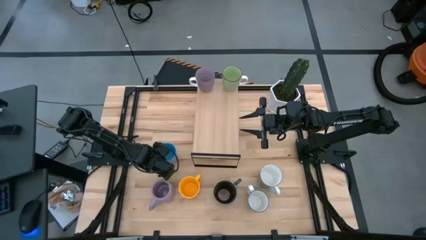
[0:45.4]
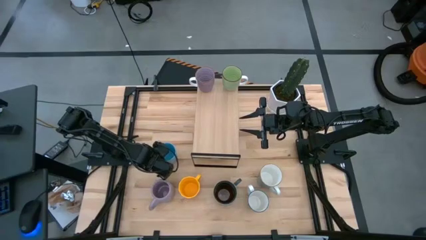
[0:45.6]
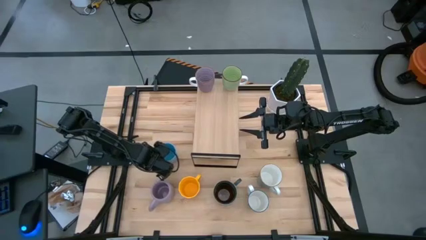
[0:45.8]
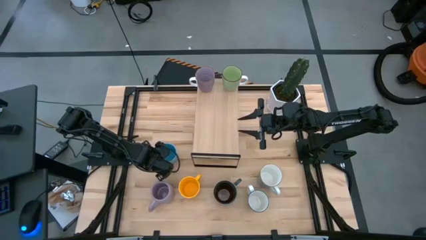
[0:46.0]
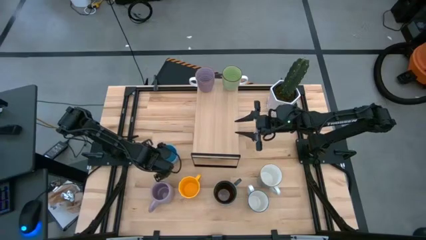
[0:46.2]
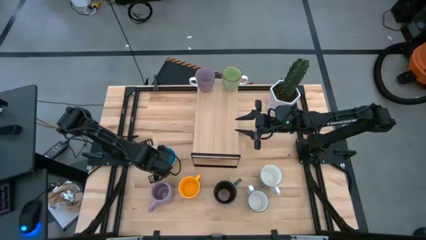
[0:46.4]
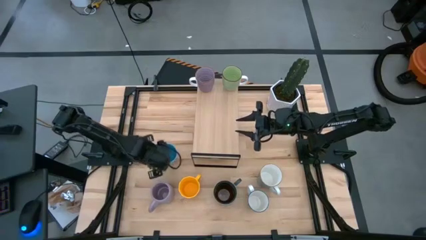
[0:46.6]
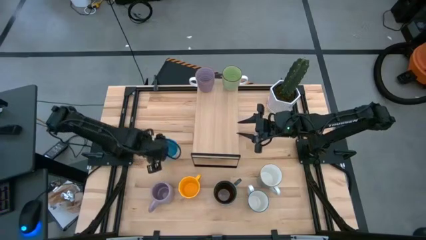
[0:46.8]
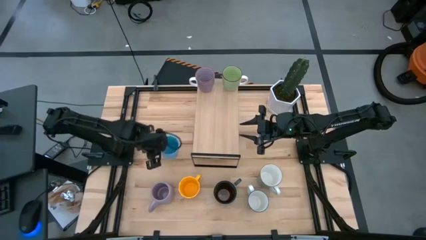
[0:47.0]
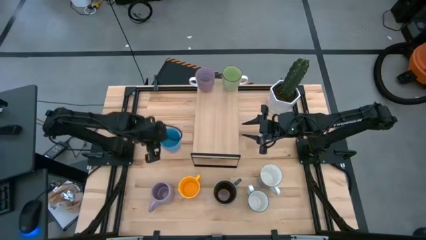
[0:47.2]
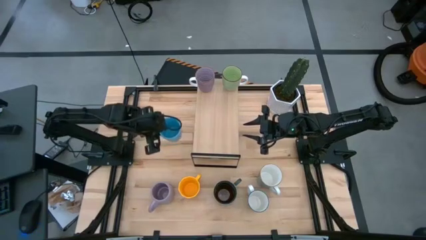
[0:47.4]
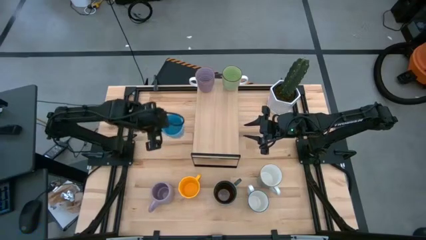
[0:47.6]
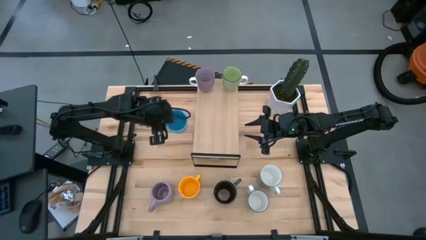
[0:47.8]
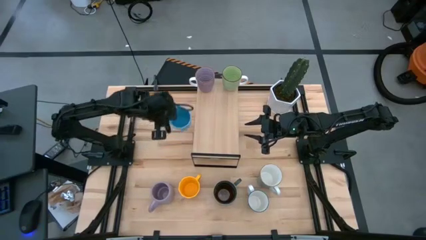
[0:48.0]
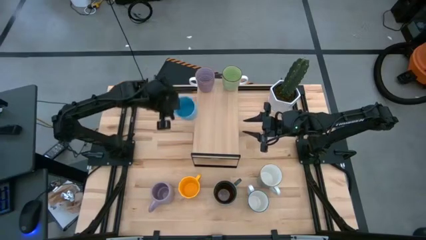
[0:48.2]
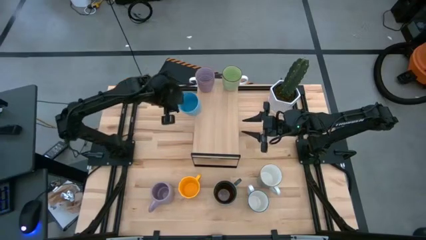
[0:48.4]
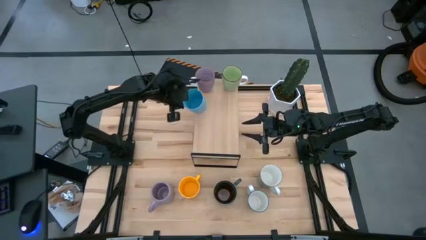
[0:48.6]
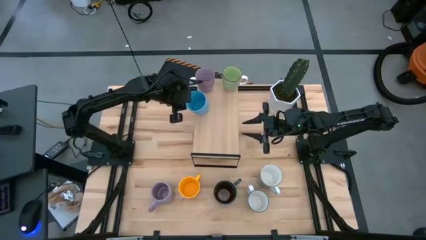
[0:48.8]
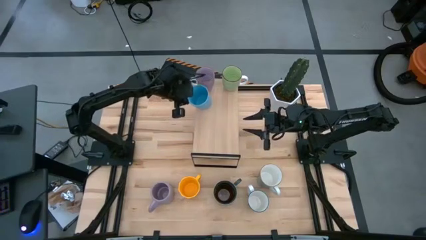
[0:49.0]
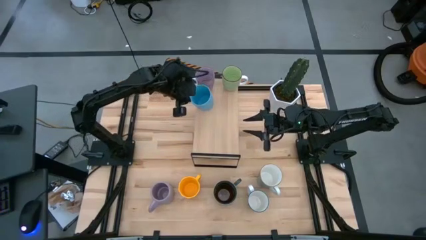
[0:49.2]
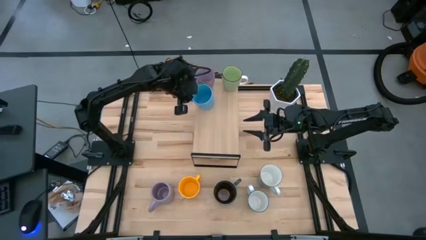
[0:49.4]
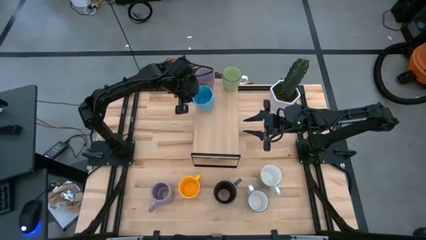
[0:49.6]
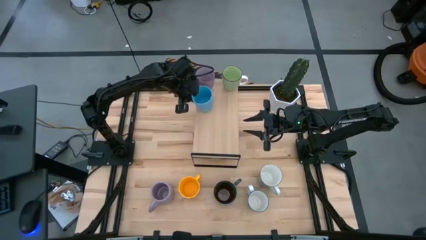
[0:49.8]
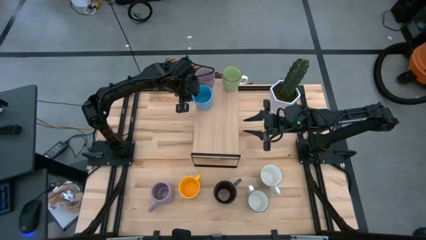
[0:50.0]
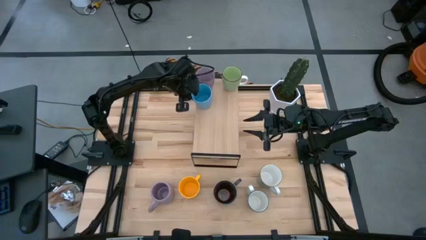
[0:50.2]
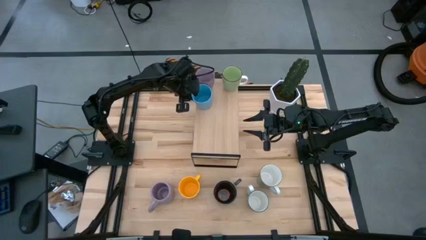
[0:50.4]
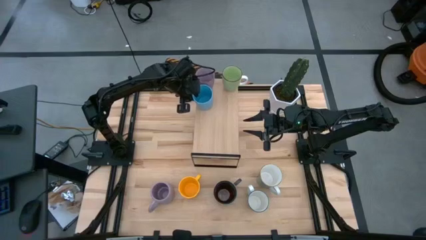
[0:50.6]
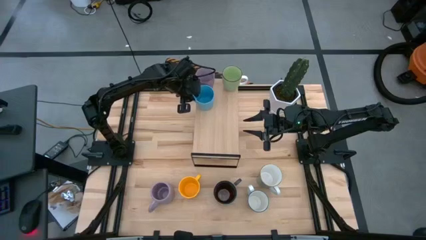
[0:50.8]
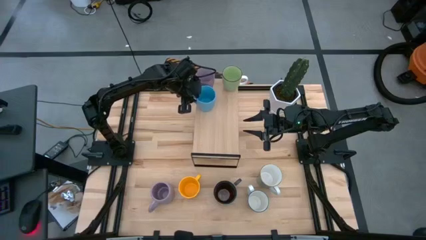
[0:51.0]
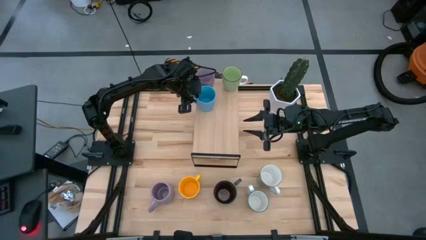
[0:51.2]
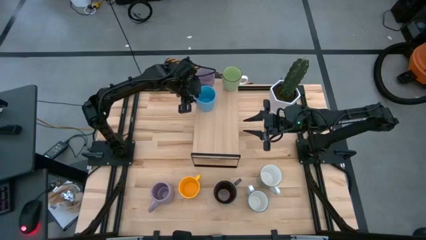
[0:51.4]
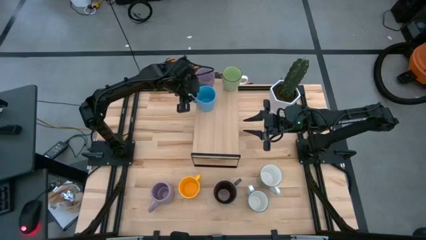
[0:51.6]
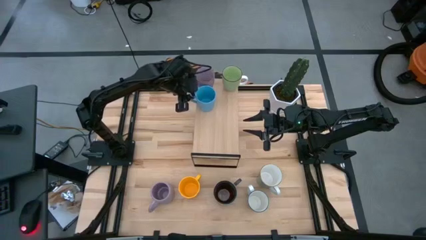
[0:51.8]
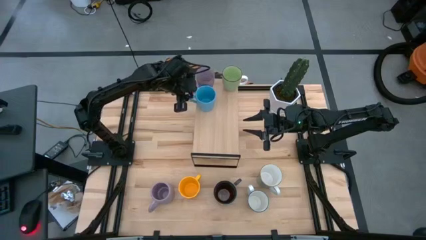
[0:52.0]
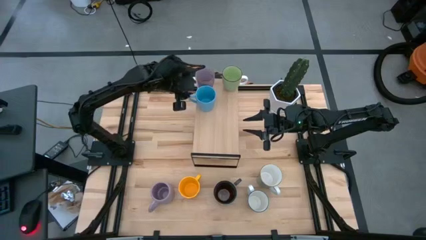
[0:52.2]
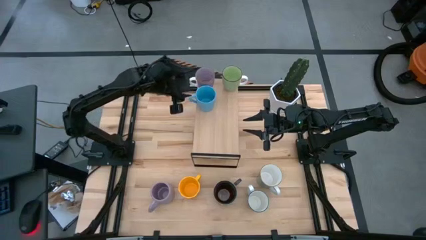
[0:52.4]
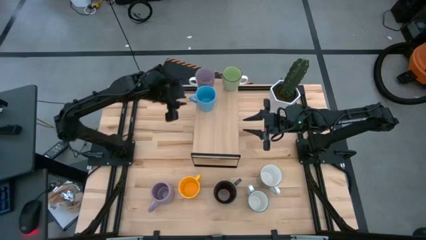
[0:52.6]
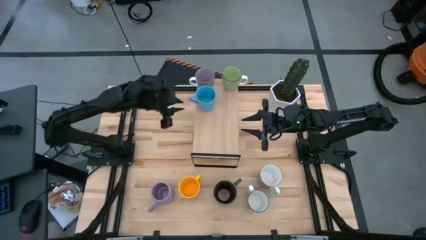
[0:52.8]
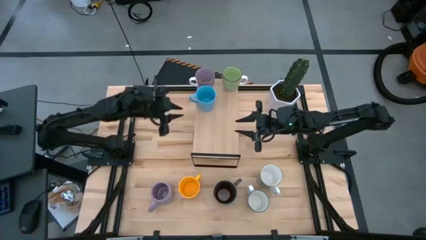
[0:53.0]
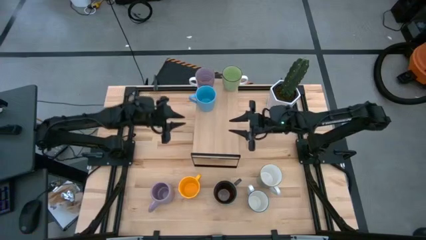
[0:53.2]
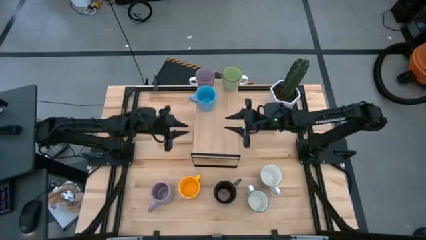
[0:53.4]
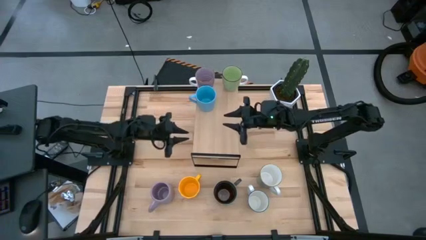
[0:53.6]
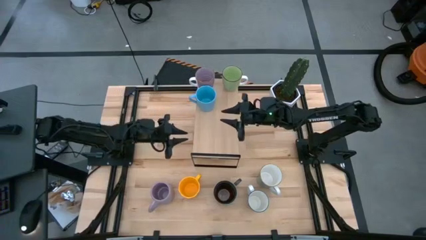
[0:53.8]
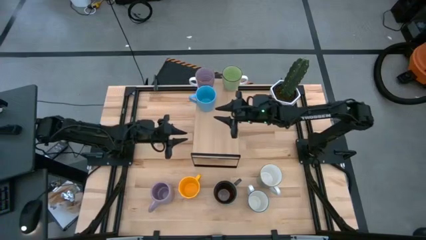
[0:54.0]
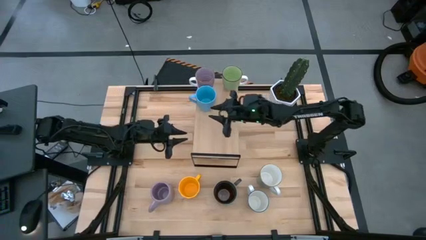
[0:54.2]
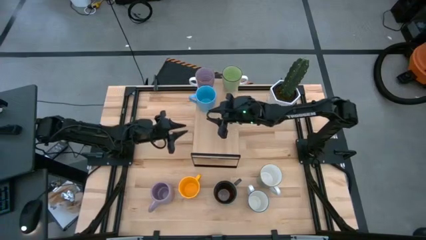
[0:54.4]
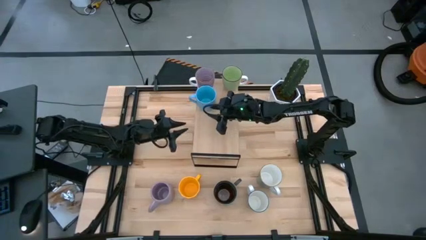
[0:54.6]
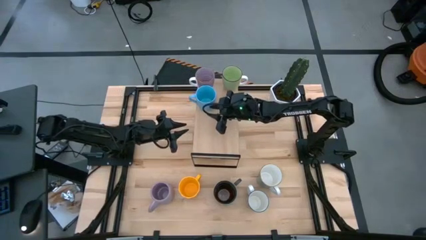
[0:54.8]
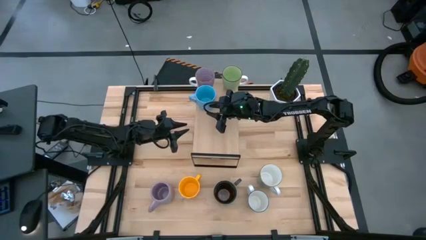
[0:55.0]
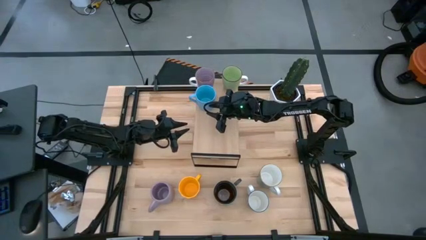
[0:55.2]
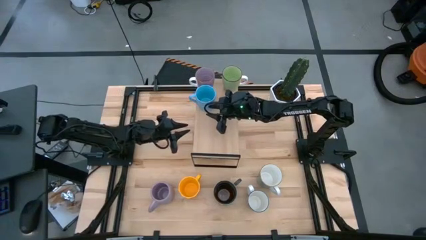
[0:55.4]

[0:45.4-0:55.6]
Task: Place coffee mugs
Put the light blue mug on the shelf

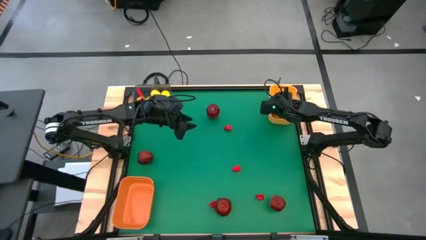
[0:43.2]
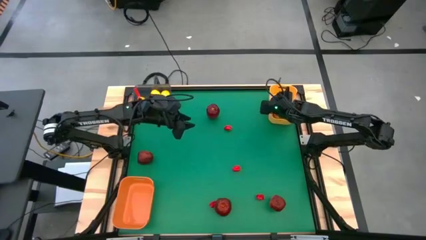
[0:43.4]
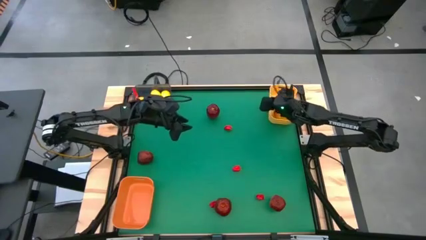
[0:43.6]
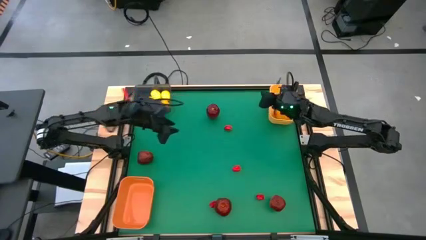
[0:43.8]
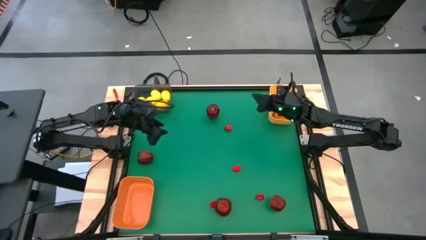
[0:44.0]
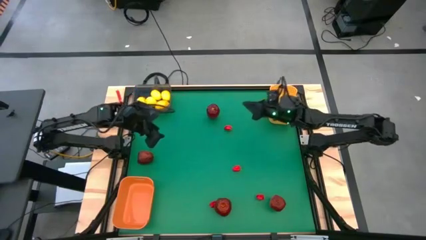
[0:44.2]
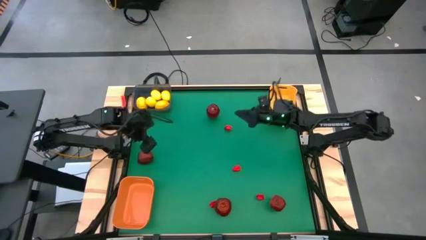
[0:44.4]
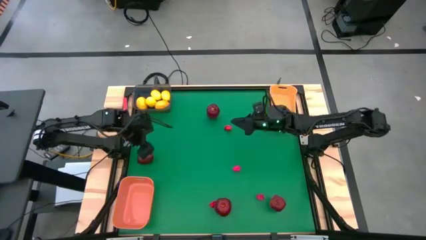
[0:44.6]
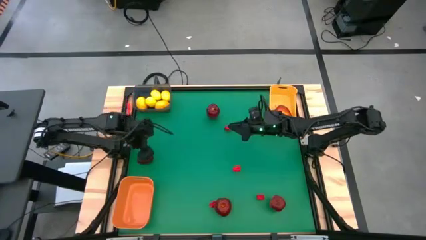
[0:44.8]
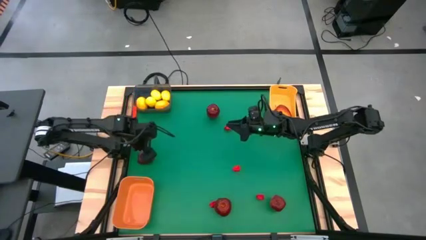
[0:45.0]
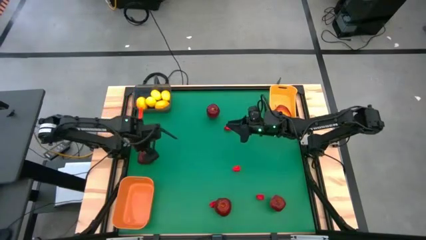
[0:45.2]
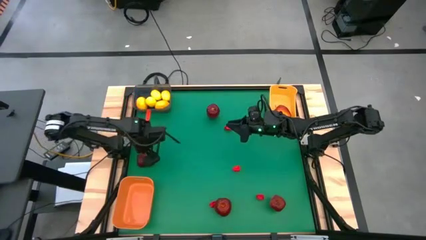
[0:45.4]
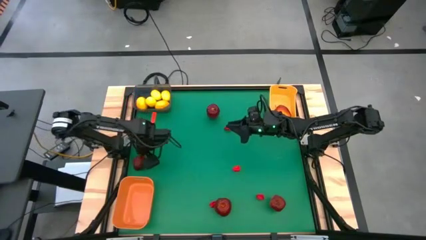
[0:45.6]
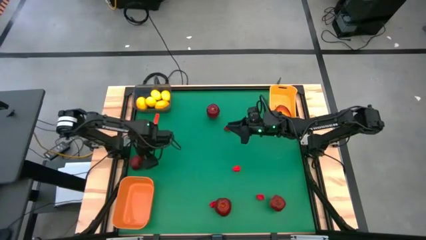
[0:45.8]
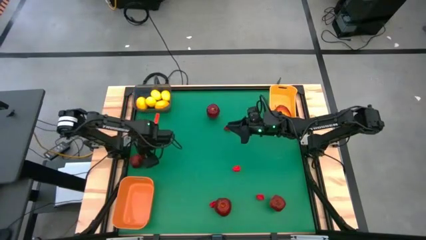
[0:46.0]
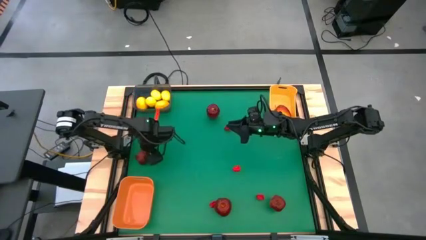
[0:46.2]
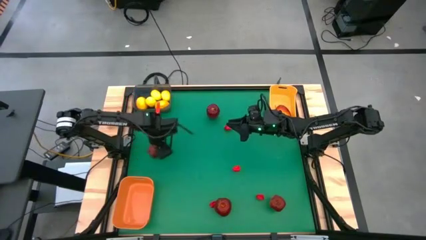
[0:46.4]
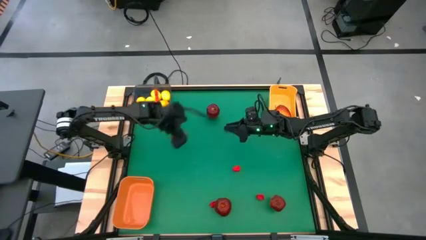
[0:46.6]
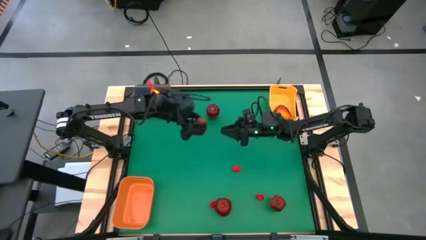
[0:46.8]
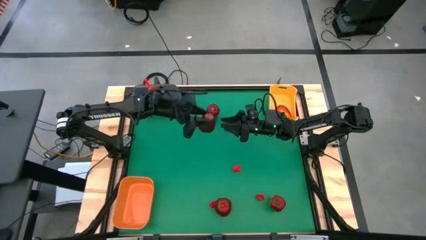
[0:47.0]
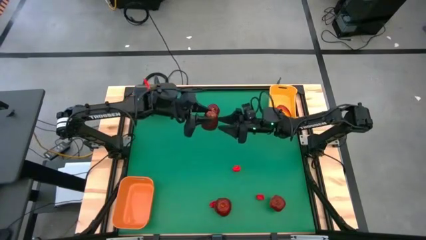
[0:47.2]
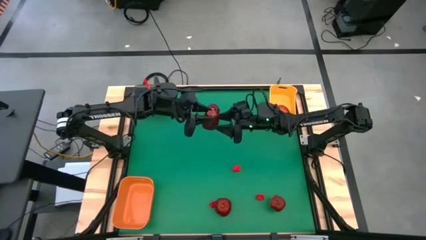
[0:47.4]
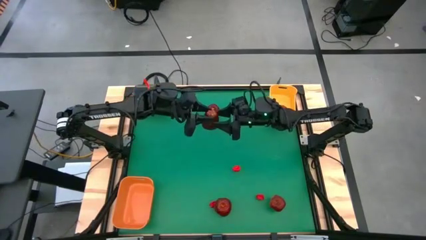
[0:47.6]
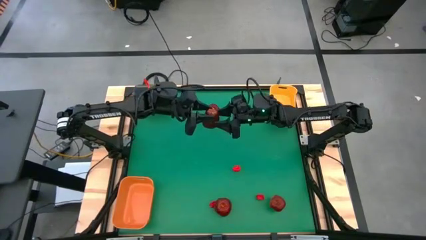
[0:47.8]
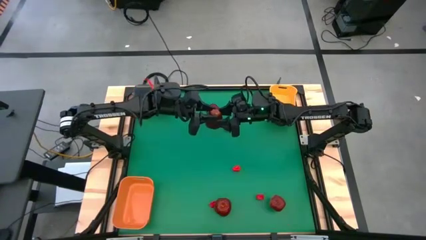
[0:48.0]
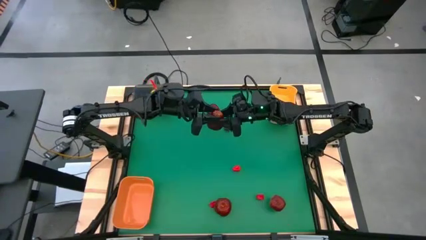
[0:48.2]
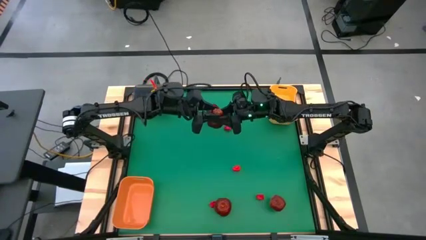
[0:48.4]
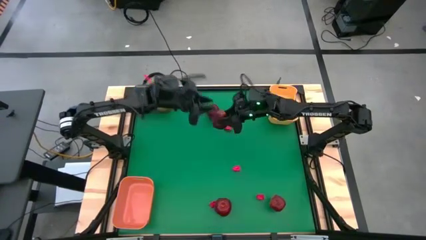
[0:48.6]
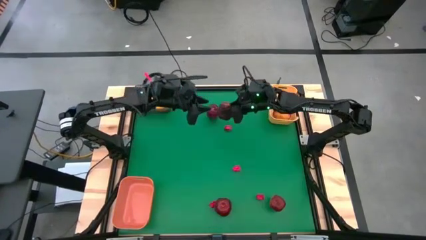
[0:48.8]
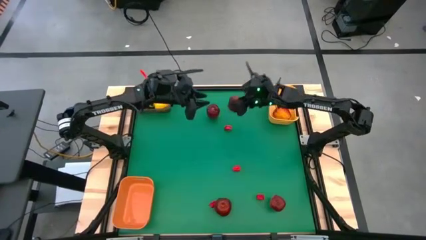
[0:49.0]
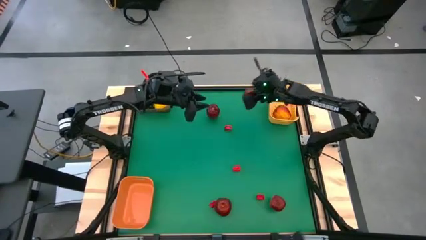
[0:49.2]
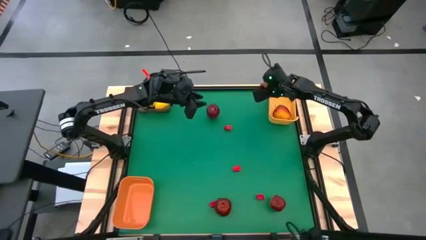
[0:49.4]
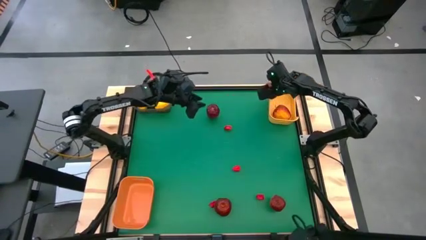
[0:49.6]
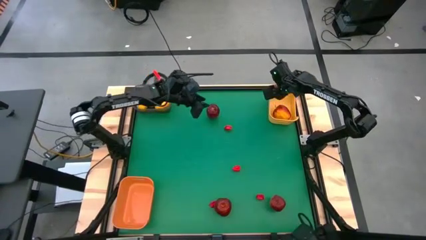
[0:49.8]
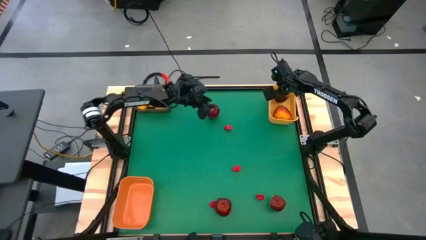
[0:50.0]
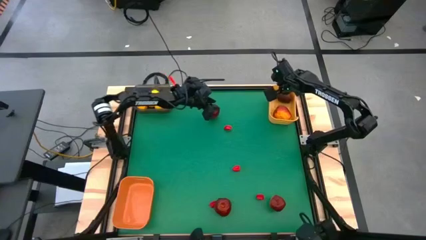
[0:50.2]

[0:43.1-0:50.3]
Task: Sort produce into baskets
Put the center-left red apple into the yellow bin
